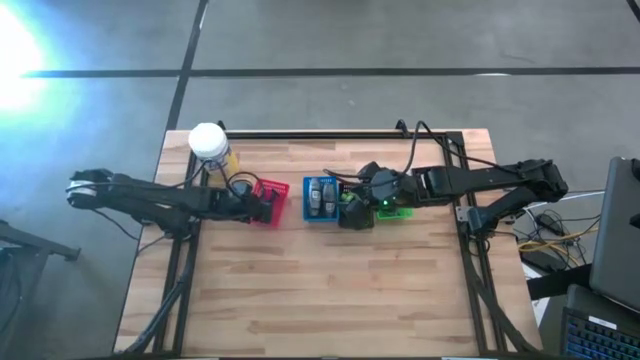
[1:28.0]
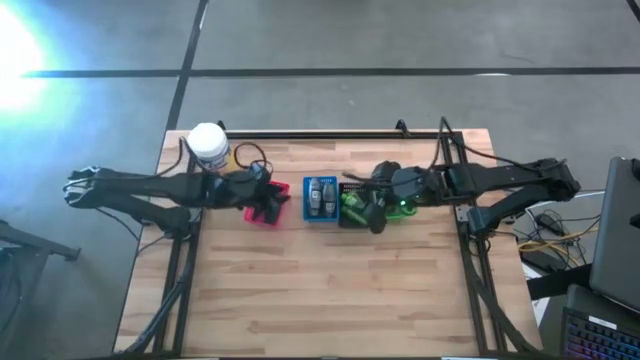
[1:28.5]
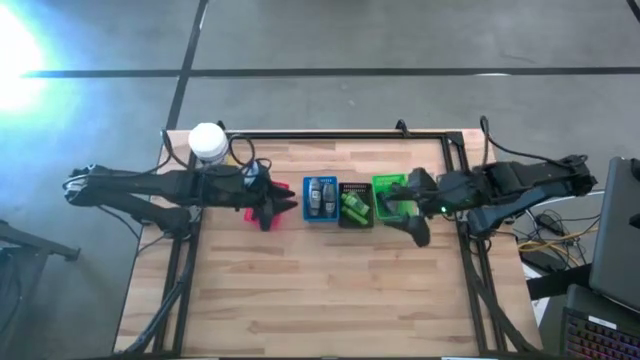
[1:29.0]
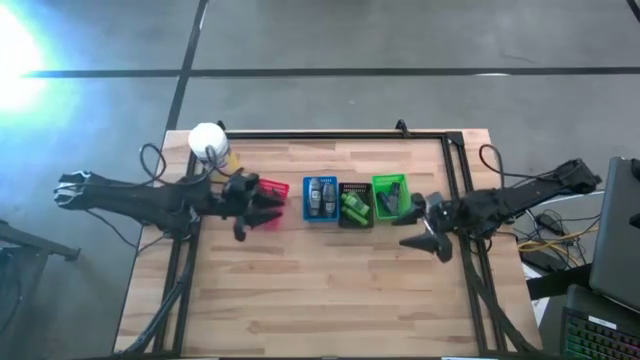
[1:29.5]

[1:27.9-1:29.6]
Task: Pick & Place Travel size toiletries
Return to Home Position

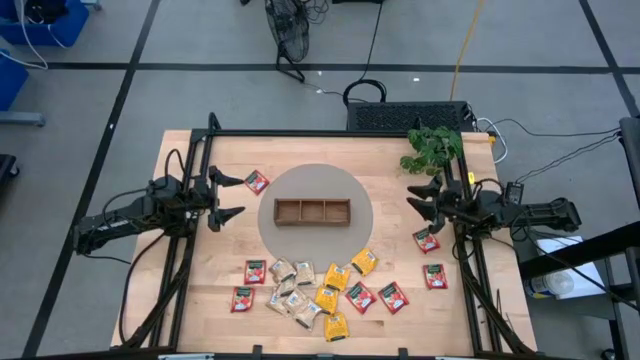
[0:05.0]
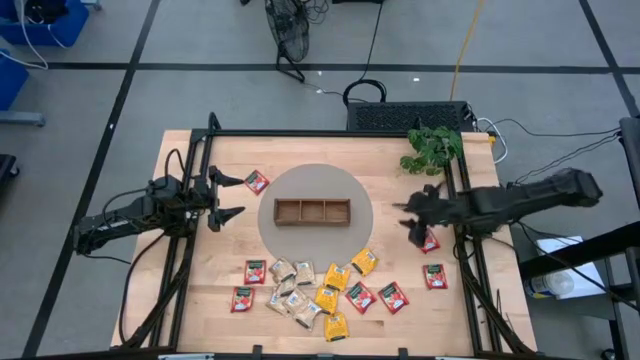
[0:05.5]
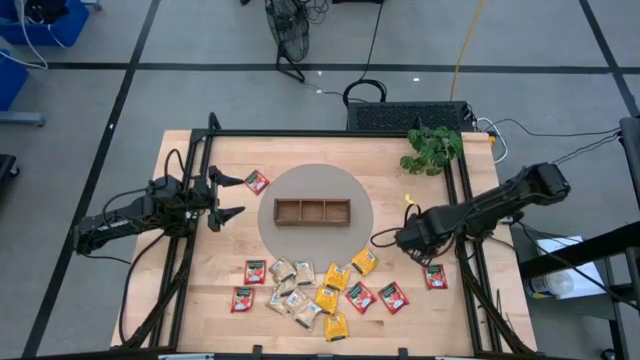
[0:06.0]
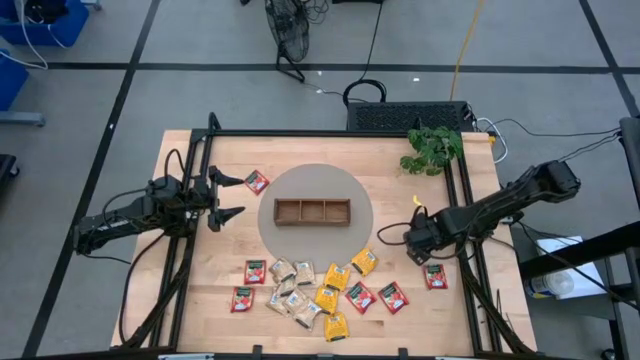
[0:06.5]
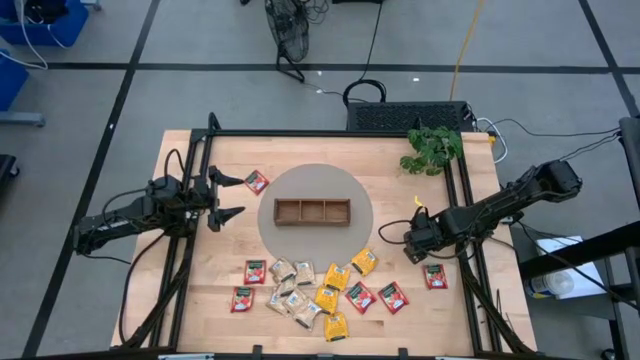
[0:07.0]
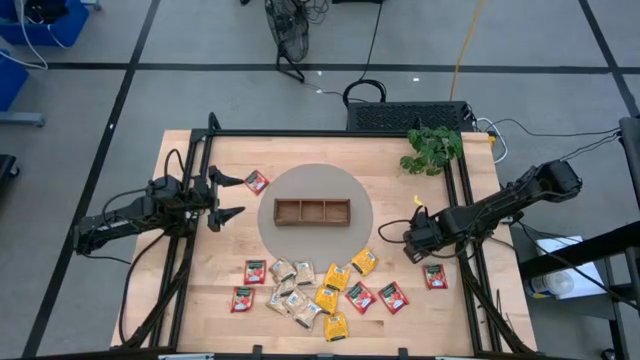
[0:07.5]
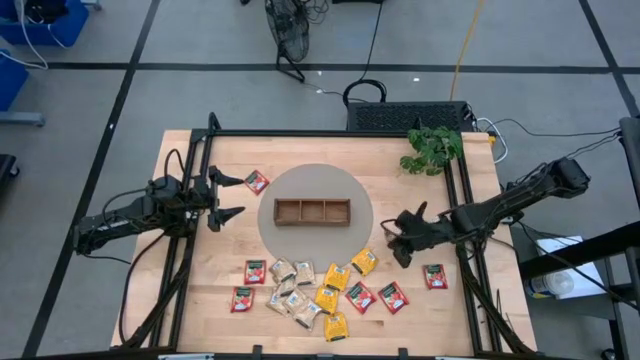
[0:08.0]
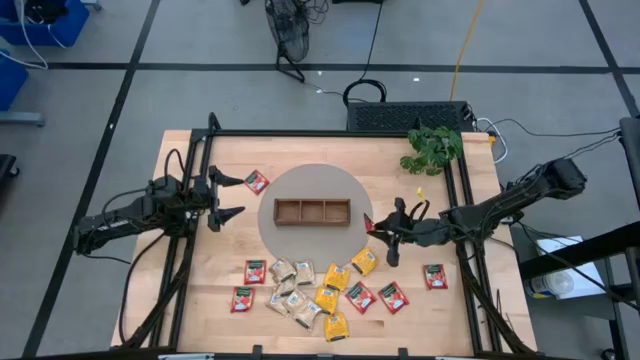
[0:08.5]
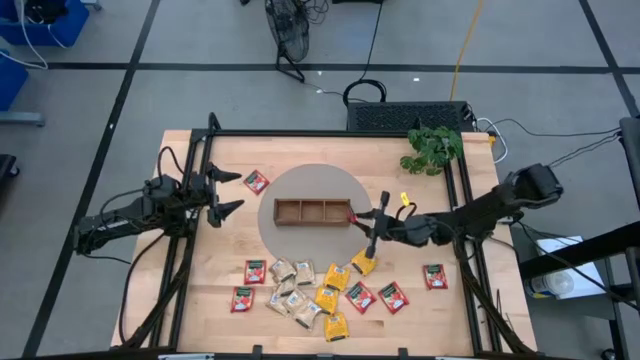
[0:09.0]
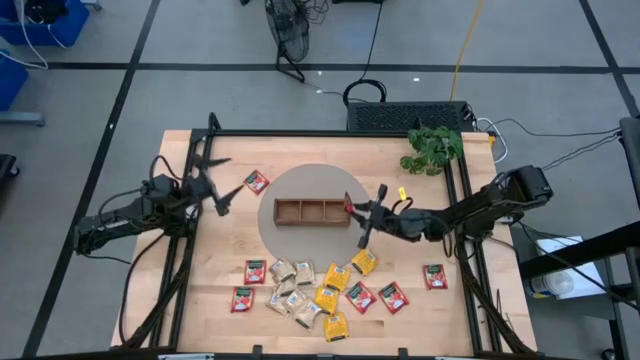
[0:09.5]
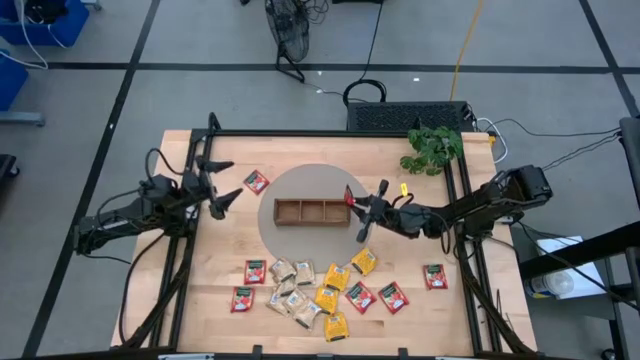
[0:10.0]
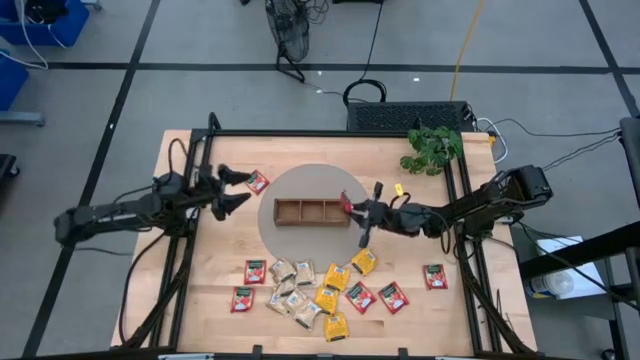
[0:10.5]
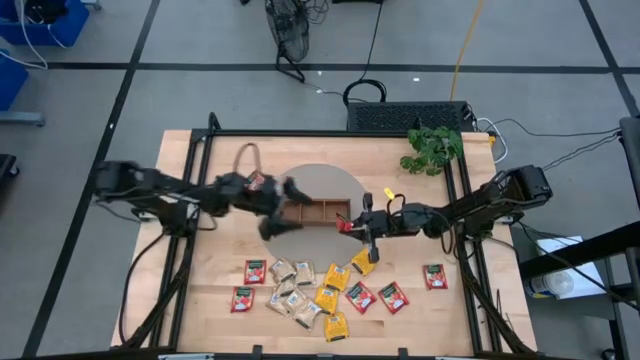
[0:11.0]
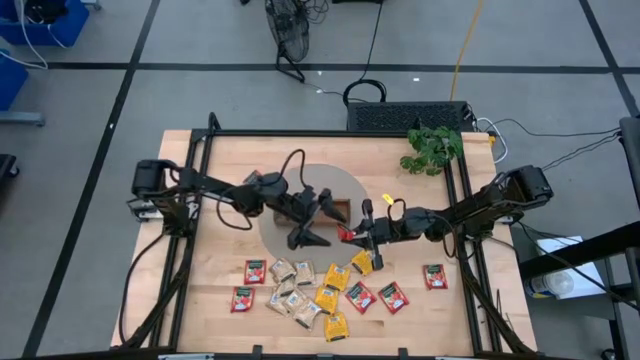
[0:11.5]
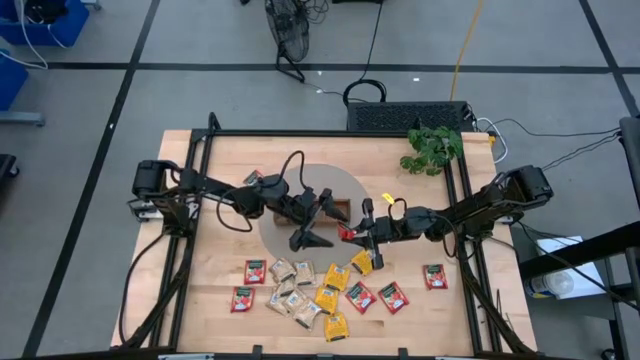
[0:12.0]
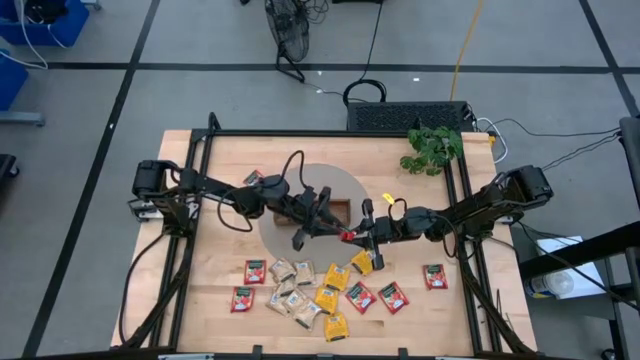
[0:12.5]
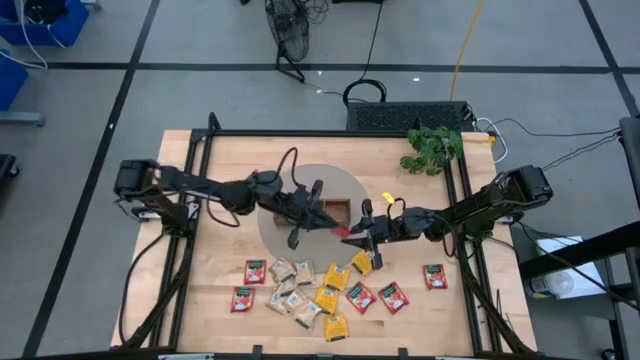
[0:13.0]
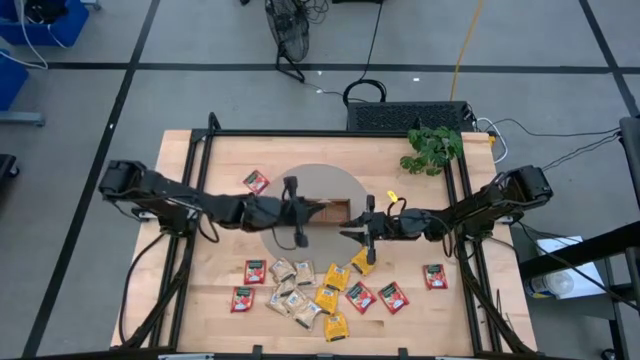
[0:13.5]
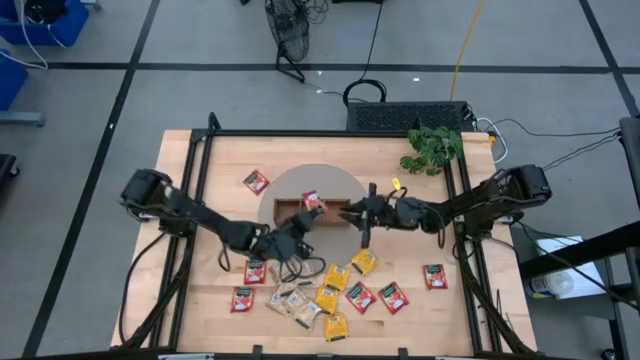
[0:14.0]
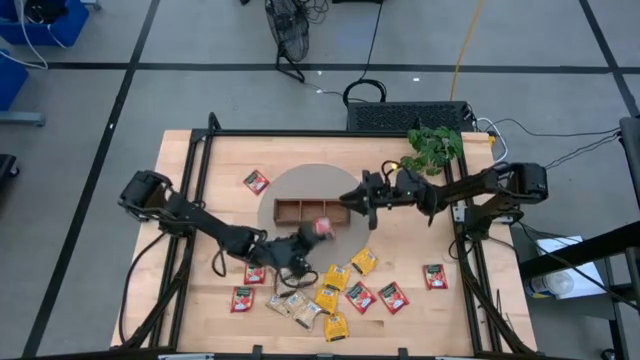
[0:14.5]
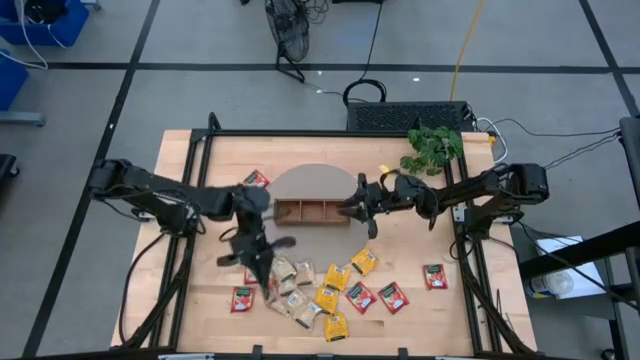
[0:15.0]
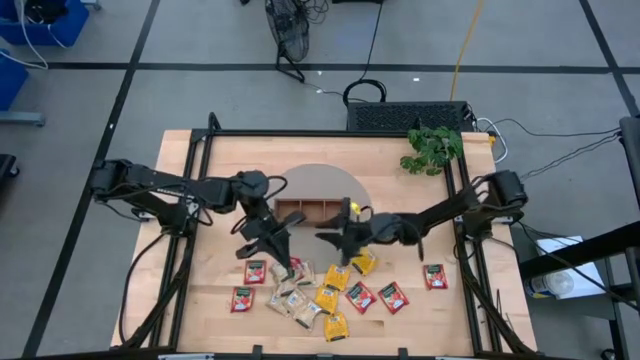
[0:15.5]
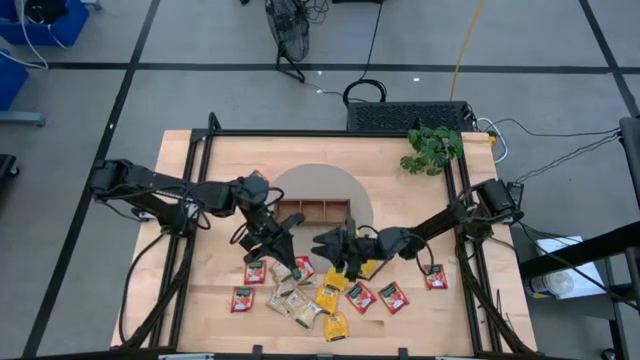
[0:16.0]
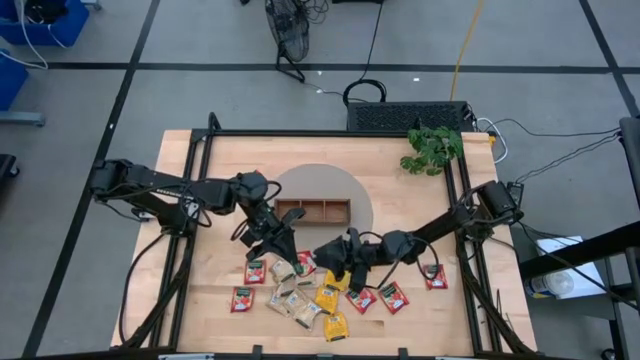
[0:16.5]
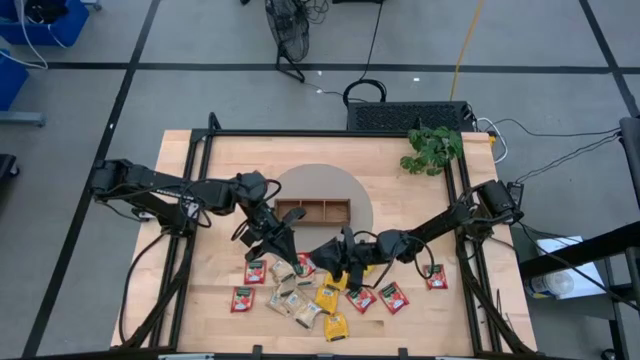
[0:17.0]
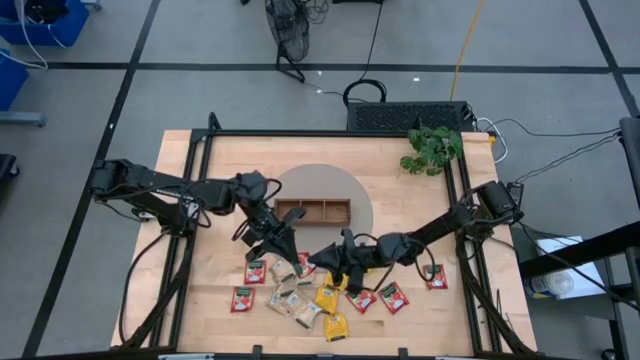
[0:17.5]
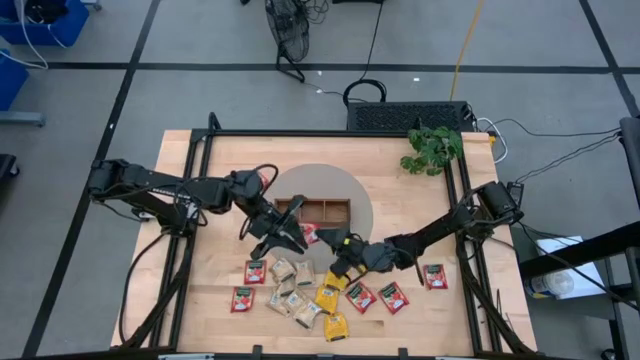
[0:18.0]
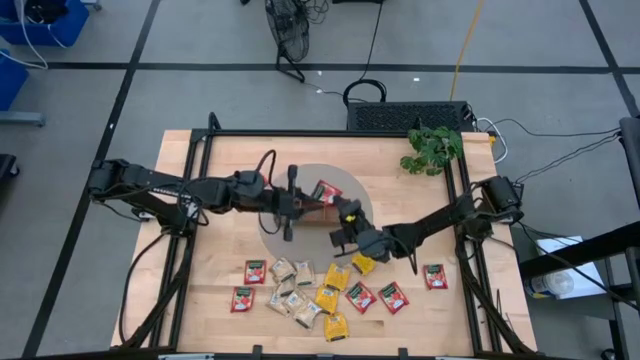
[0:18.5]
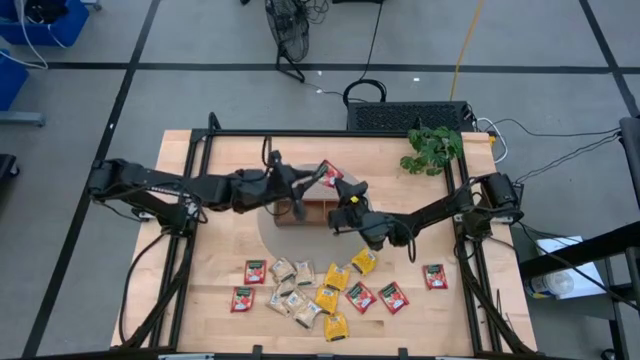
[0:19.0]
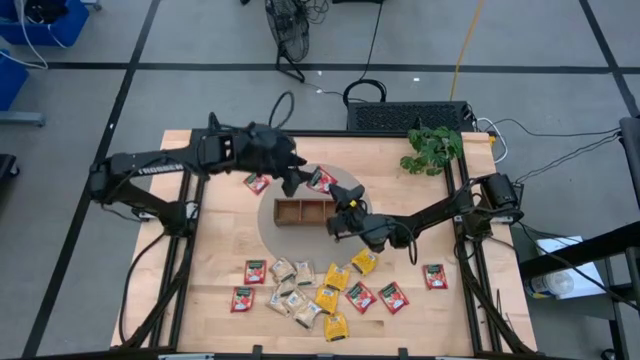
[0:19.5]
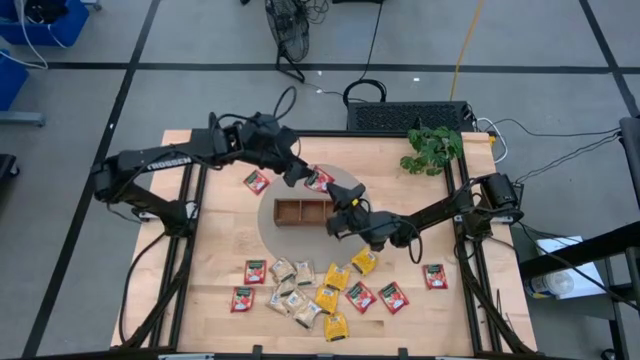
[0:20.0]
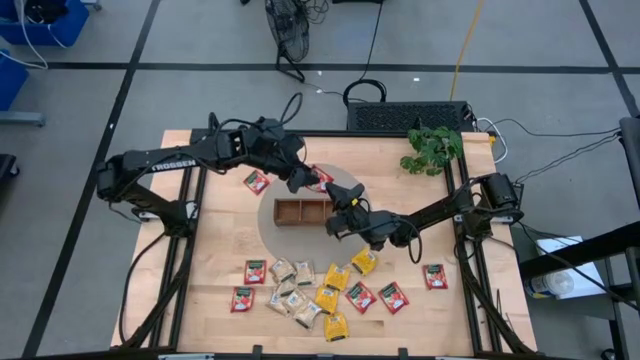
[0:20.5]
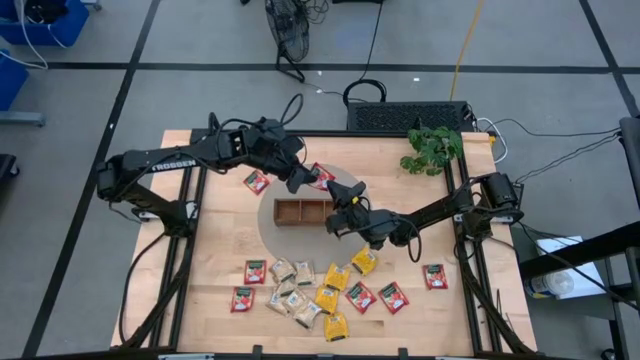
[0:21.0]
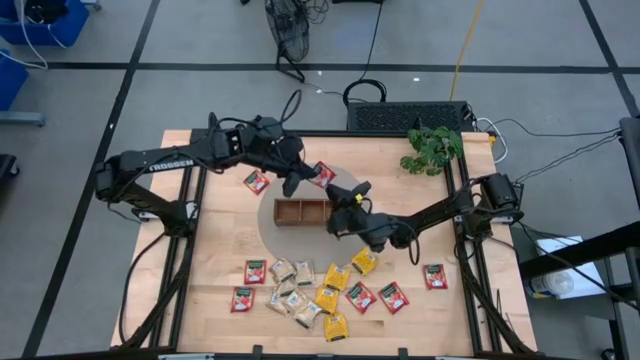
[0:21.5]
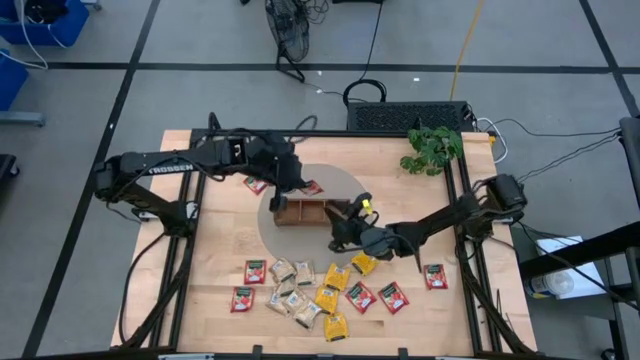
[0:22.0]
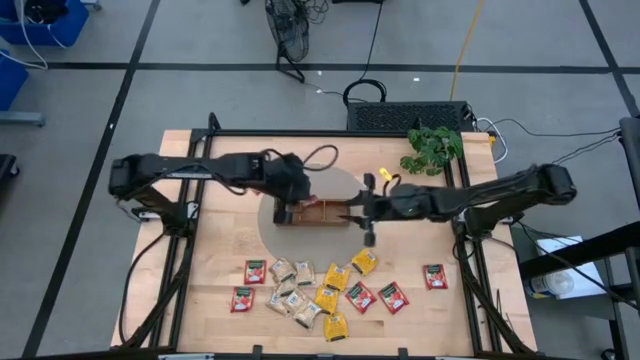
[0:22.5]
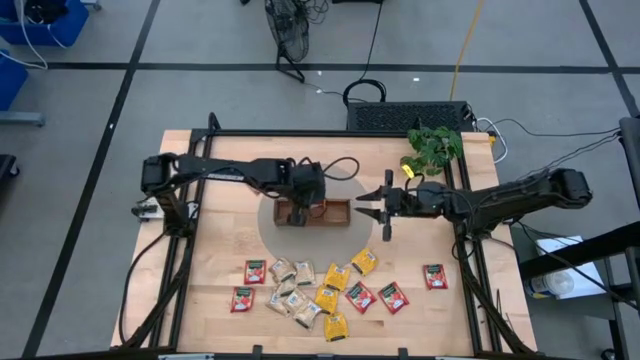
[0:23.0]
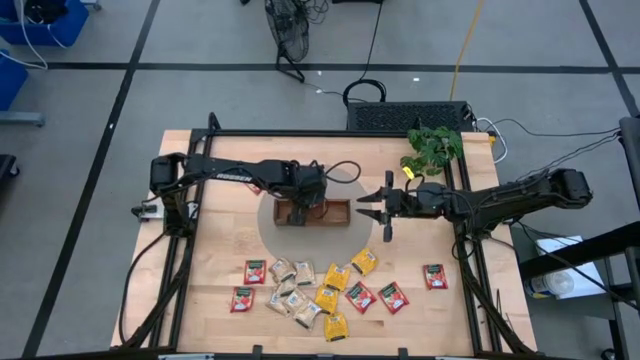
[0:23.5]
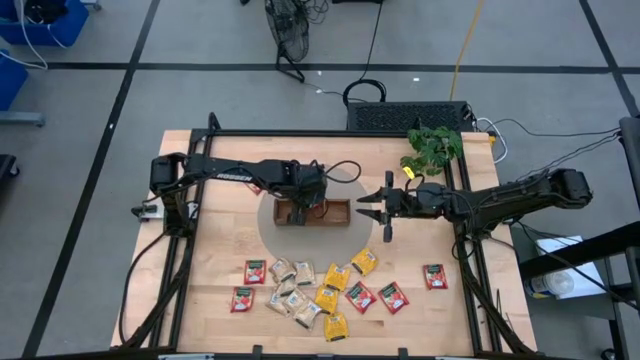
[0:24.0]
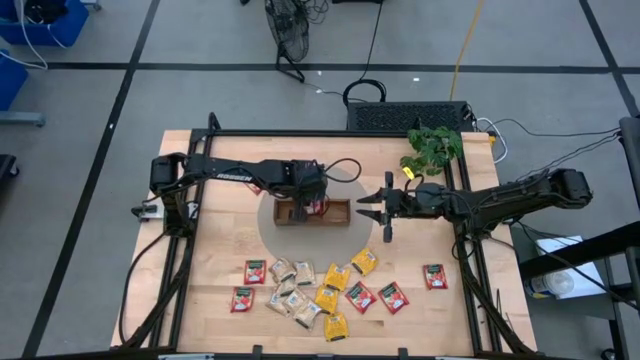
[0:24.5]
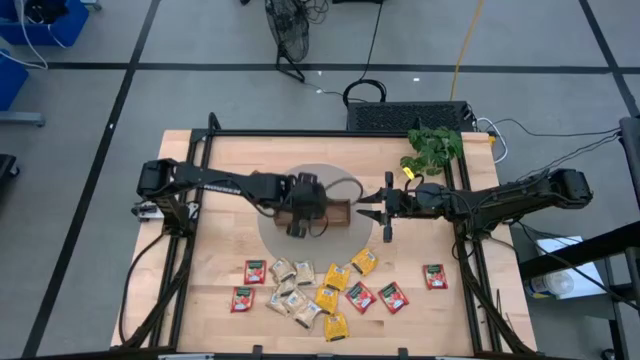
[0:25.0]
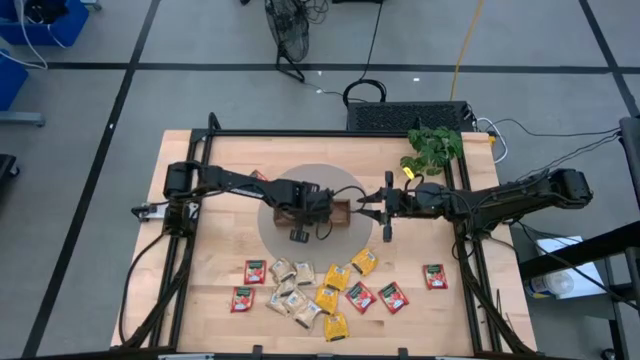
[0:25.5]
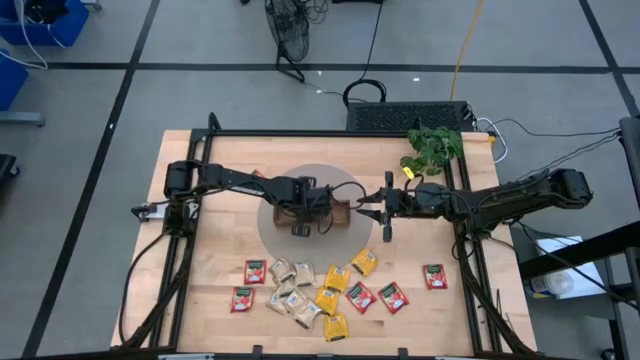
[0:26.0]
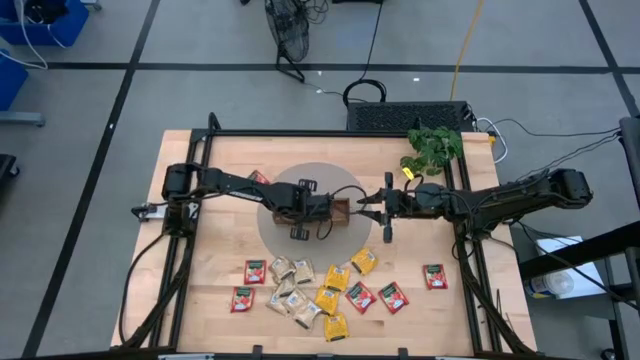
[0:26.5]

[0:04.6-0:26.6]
Task: Pick & Place Tea
Put the red tea bag into the wooden organizer
